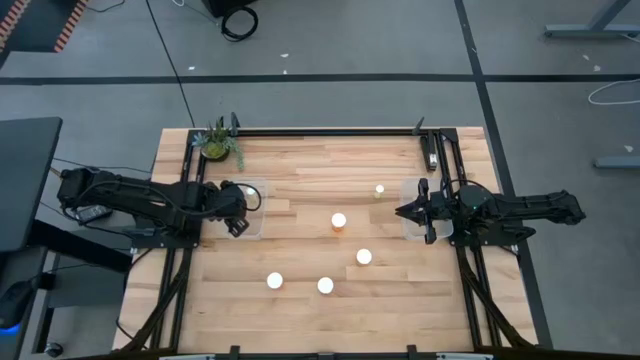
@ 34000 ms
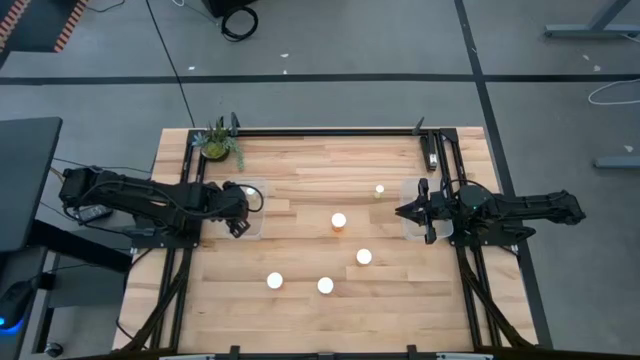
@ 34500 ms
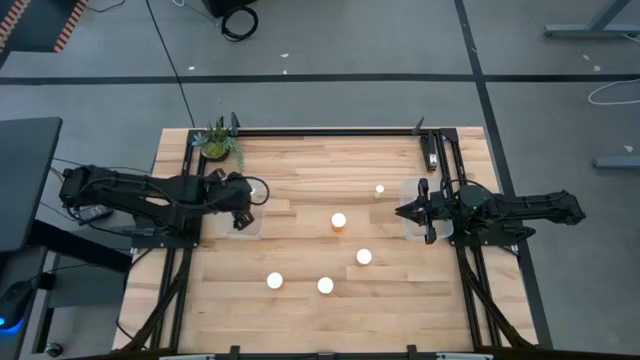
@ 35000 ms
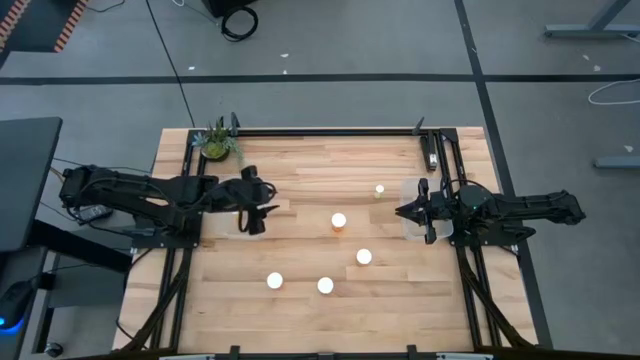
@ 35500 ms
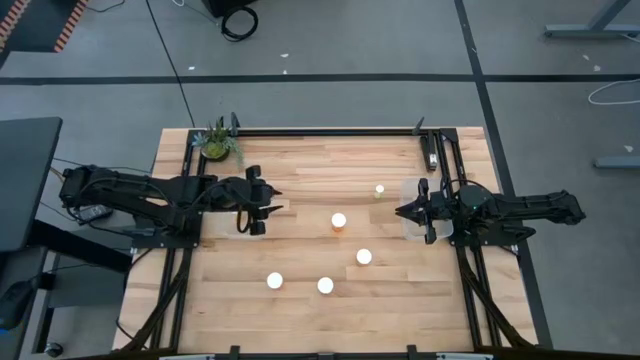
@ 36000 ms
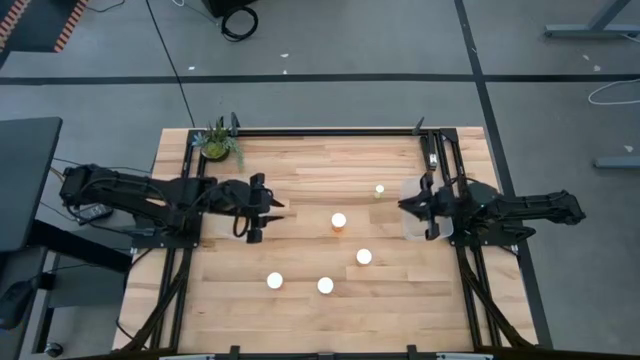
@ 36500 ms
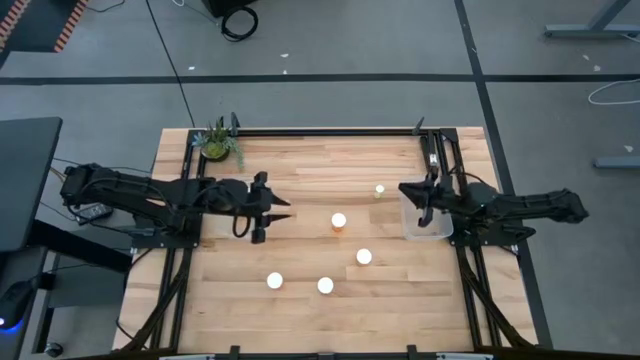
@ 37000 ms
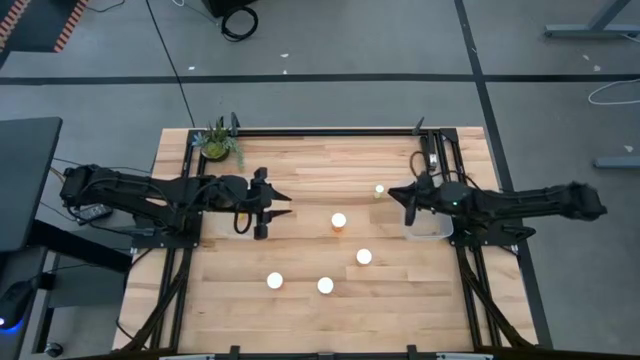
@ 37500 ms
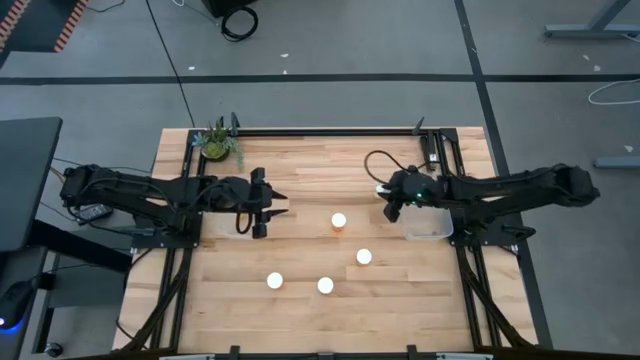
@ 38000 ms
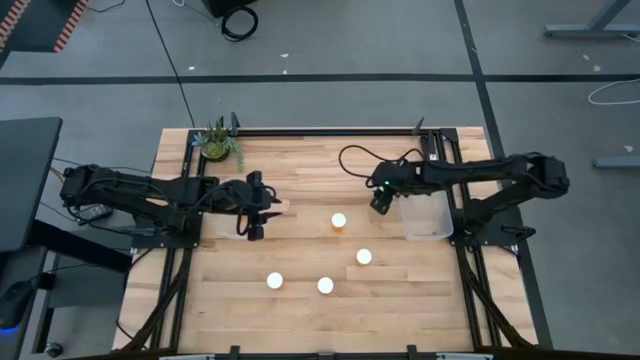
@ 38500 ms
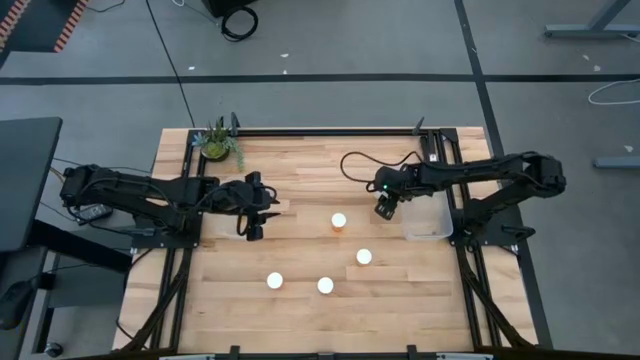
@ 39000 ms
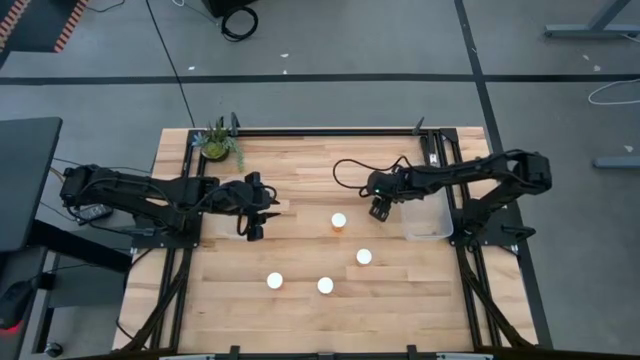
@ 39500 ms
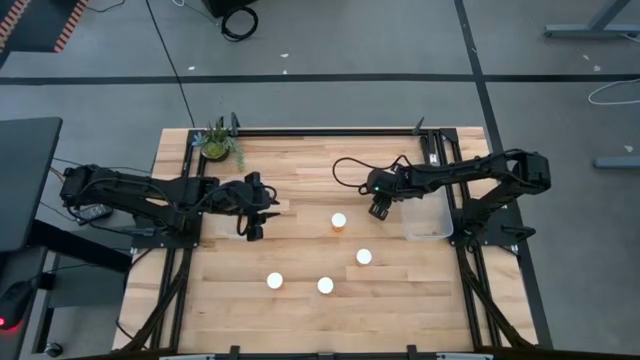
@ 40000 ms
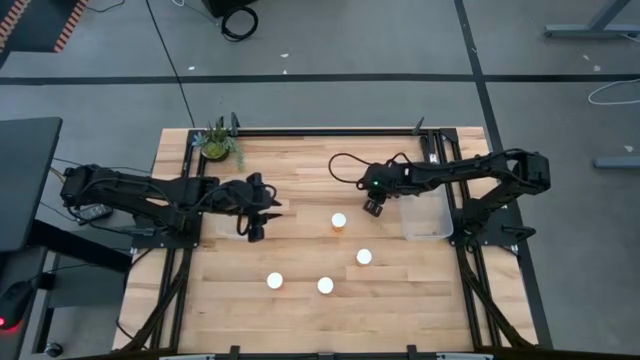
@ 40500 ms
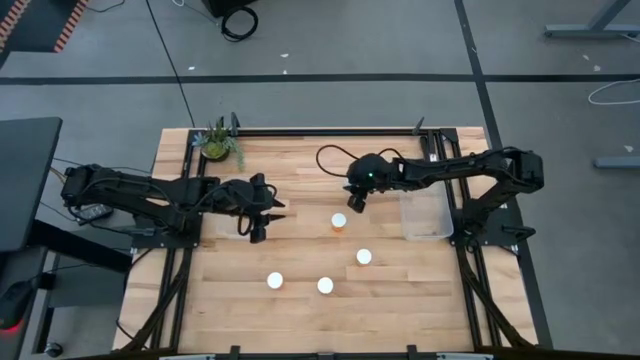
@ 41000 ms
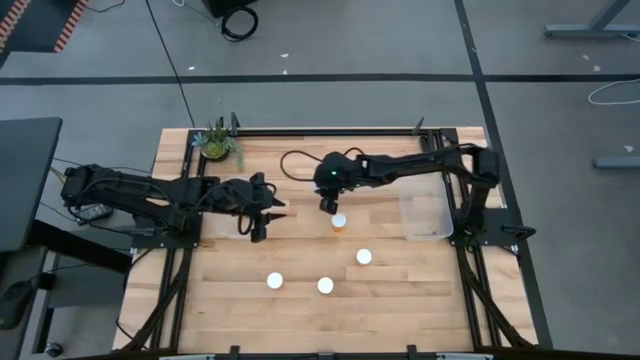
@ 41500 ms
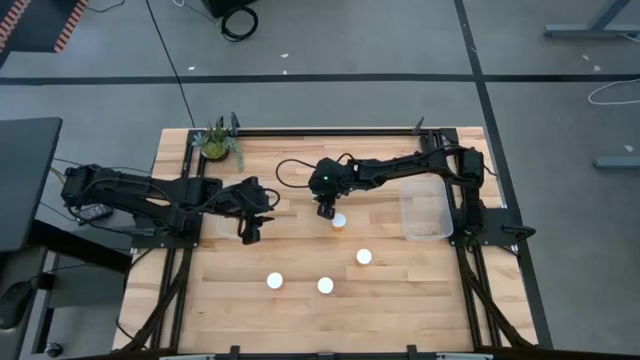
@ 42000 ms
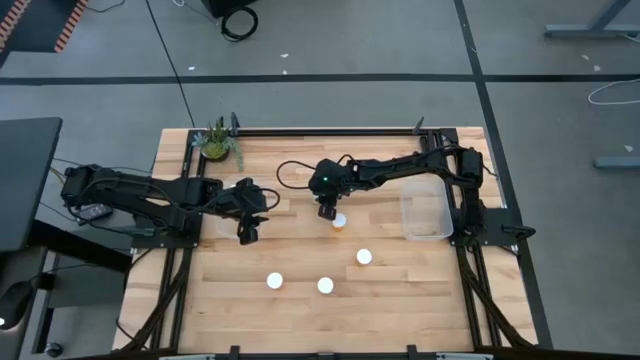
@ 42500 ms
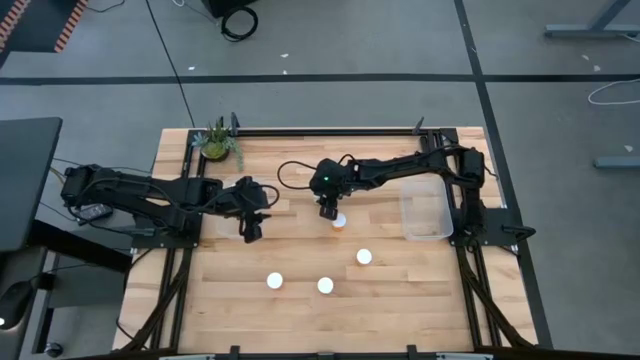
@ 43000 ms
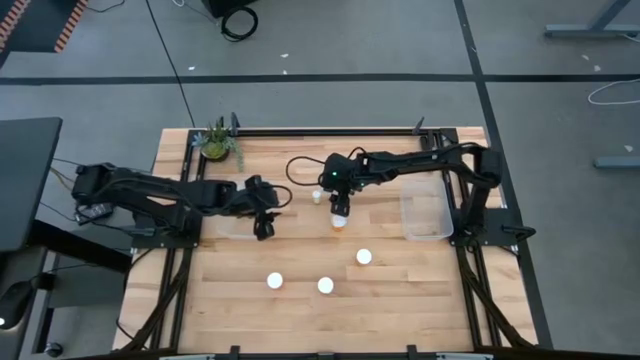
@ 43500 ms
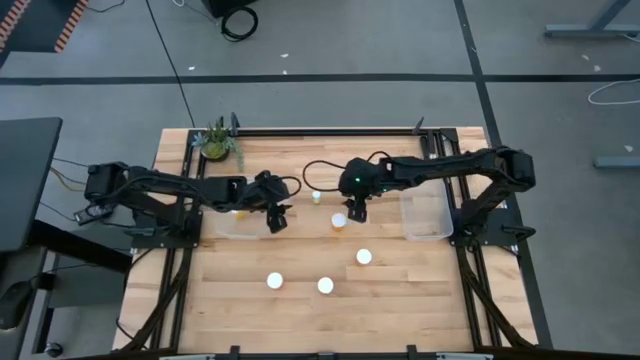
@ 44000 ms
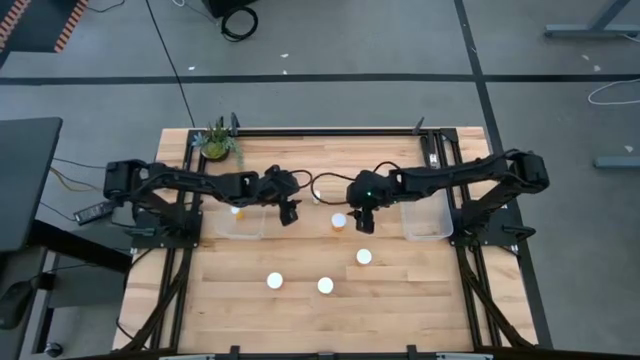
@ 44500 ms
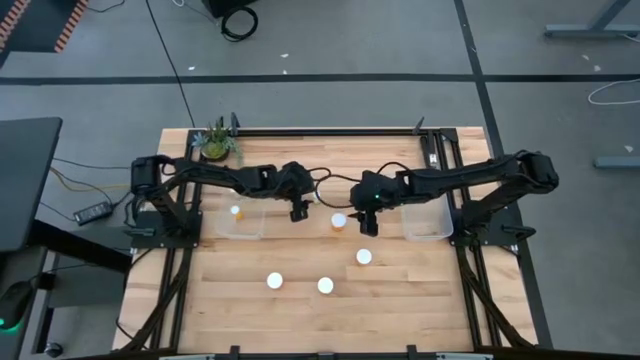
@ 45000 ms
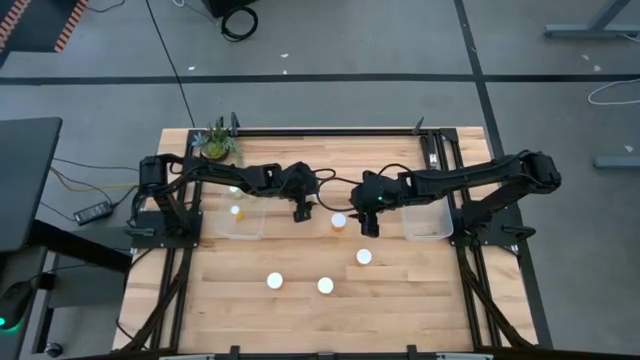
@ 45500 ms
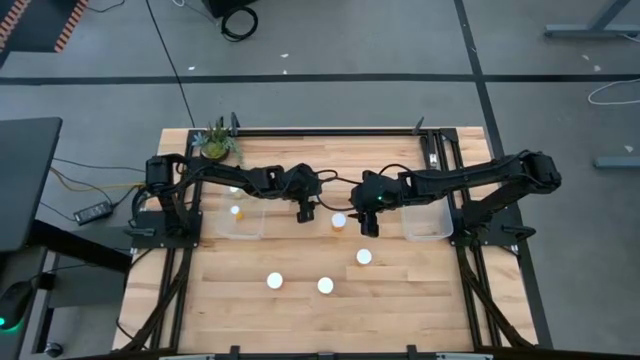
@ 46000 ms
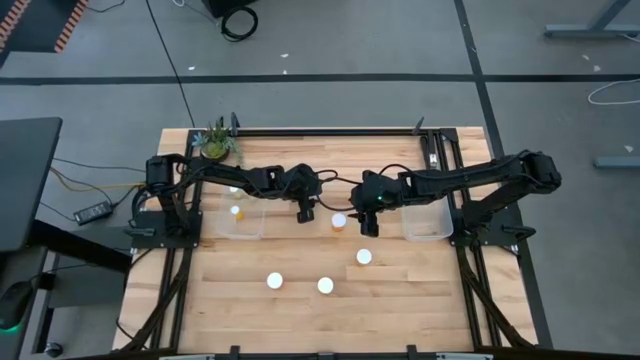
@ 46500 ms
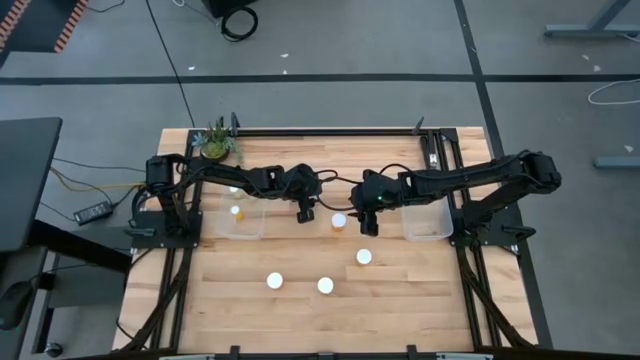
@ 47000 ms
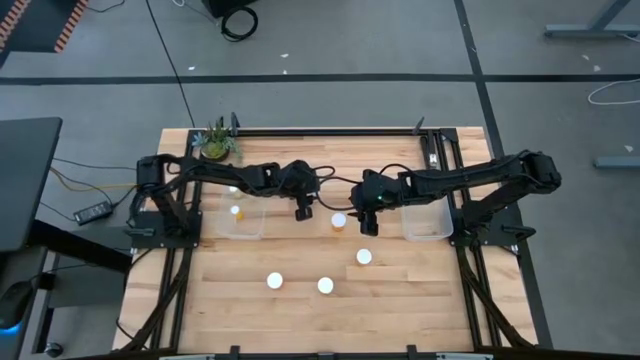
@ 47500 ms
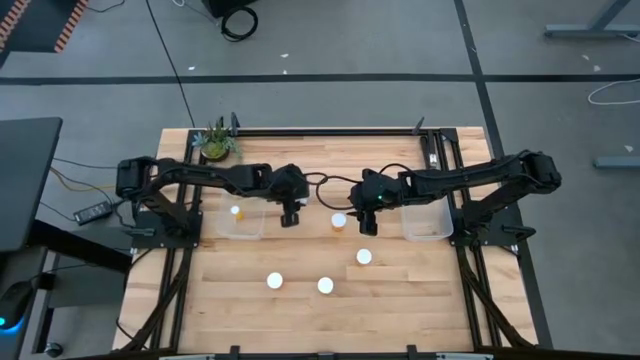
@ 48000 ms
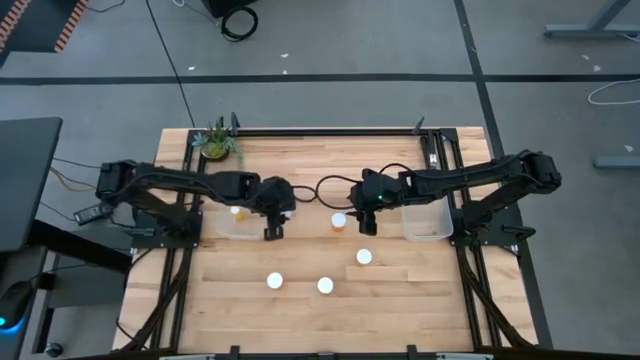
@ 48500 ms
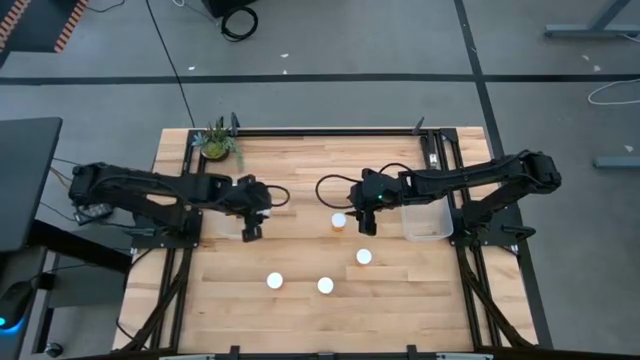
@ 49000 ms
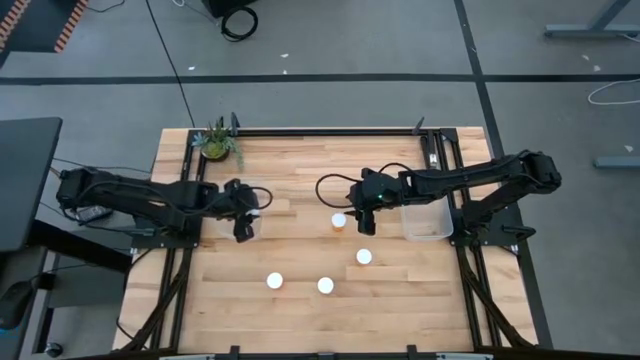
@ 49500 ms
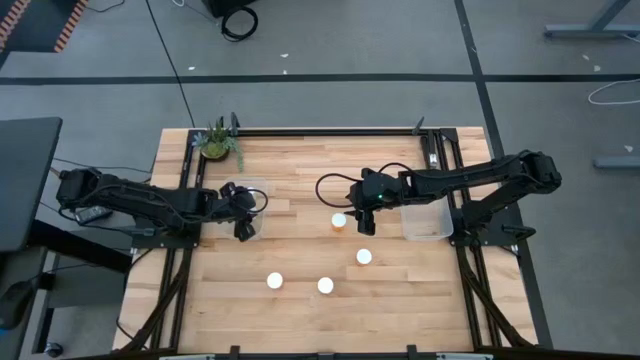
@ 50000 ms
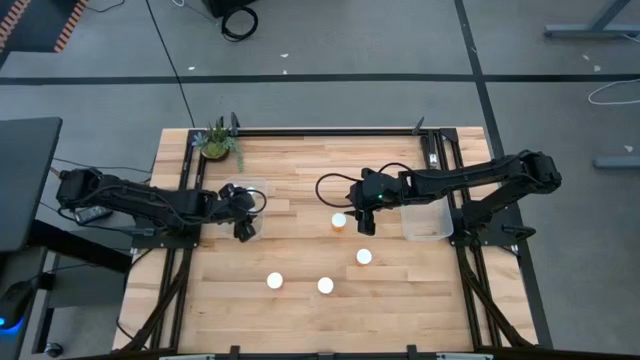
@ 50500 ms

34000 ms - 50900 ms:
Task: Pick and place medicine bottles into bin by pill shape (circle, oval)
Put the small yellow pill bottle into the left transparent bin

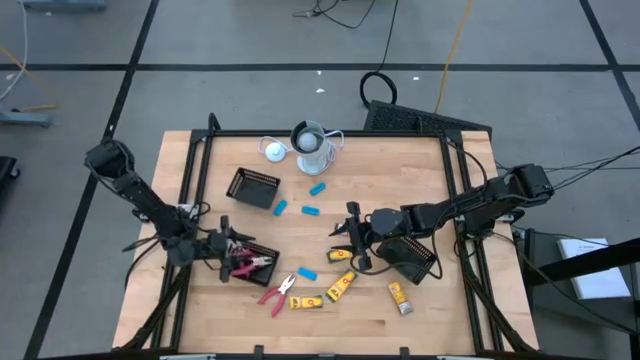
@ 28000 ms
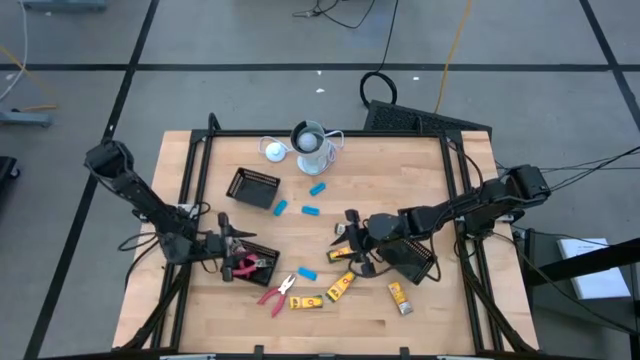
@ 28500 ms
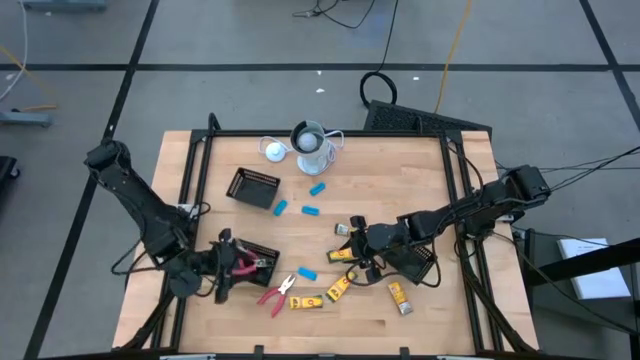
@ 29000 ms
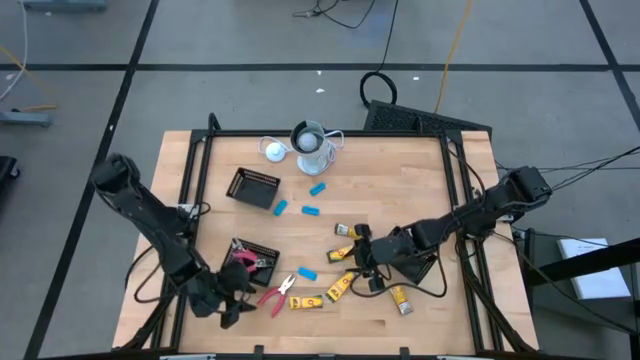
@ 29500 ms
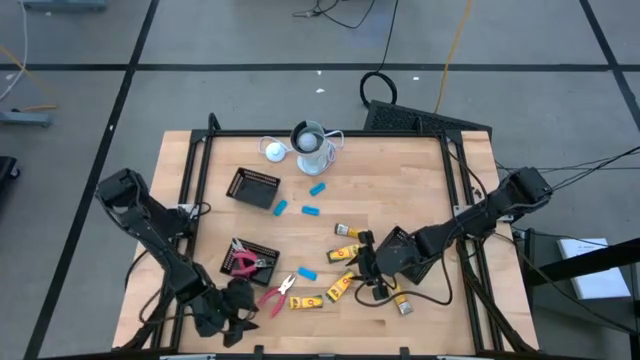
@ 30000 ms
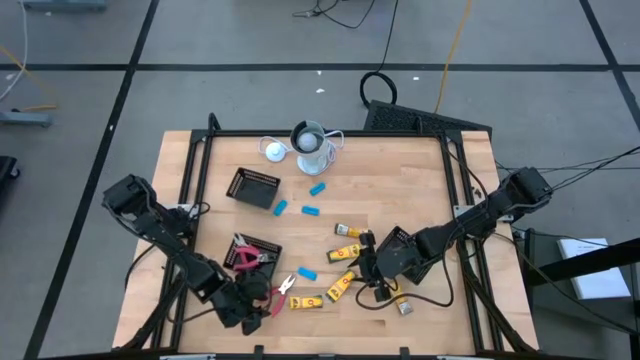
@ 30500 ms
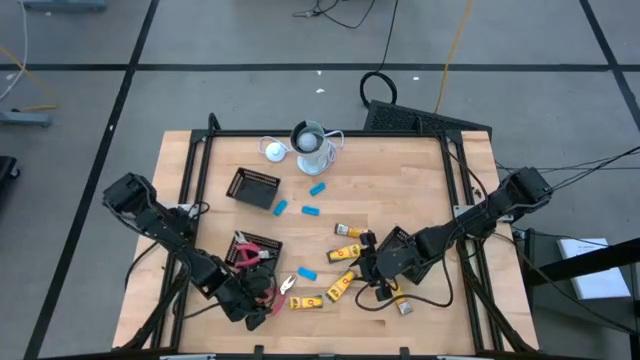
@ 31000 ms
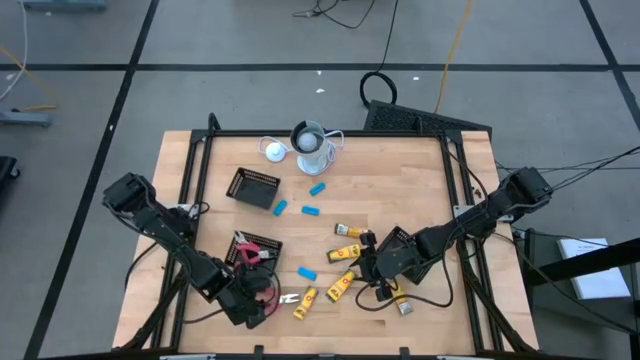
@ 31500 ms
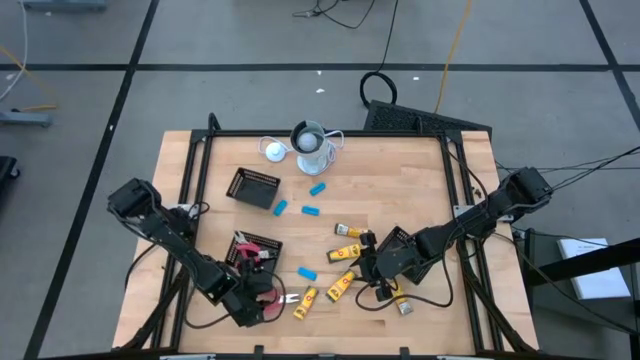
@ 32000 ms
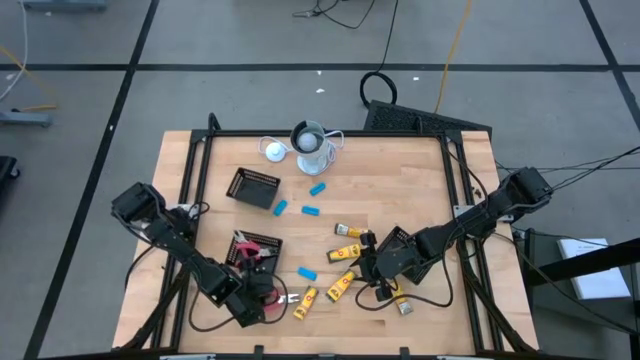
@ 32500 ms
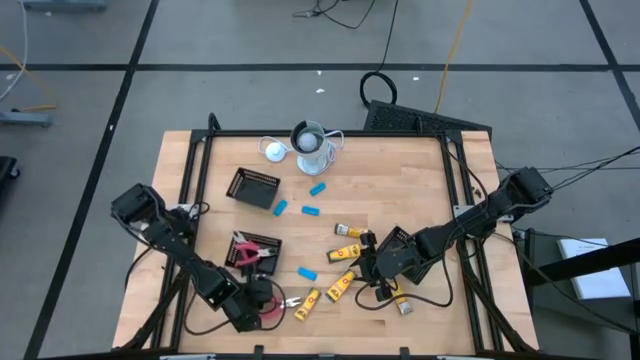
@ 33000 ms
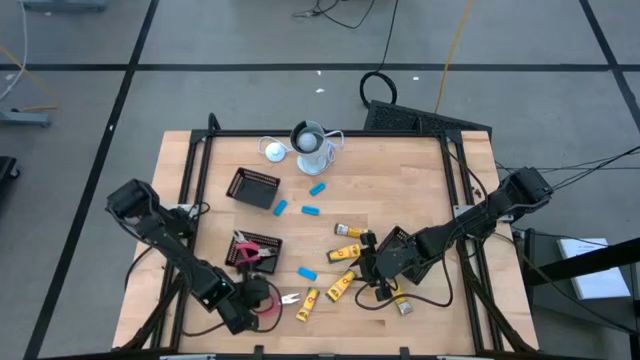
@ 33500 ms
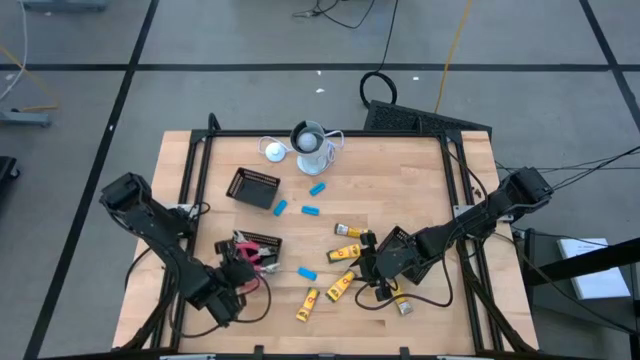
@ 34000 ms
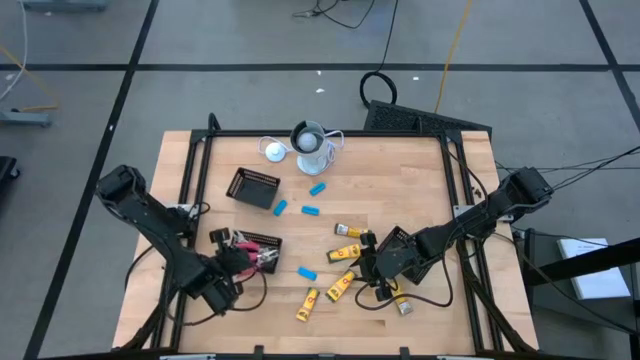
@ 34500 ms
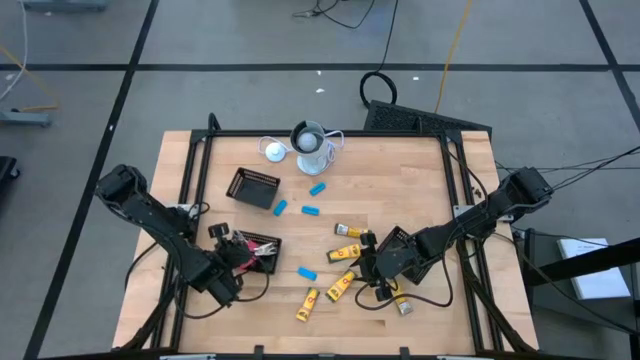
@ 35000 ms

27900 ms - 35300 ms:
Task: Pick & Place School Supplies
Put the pink hole puncher into the bottom left black bin
